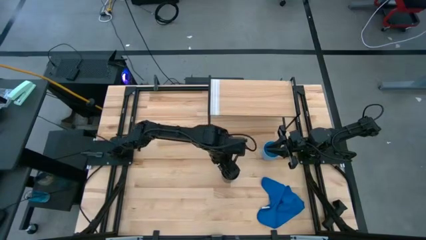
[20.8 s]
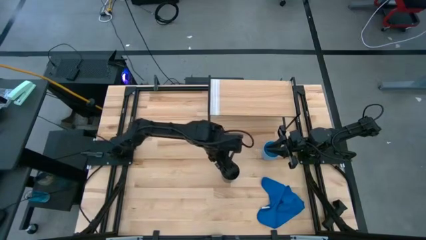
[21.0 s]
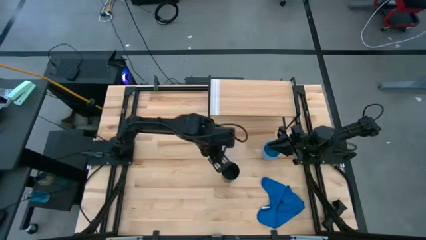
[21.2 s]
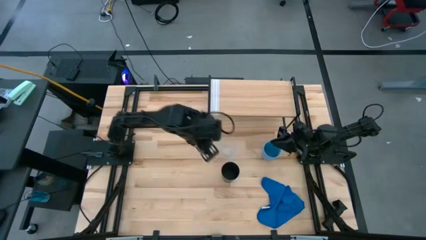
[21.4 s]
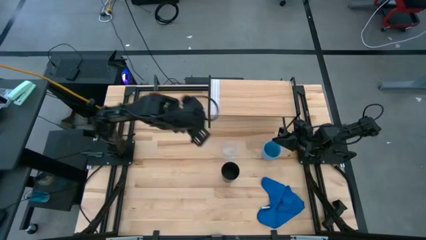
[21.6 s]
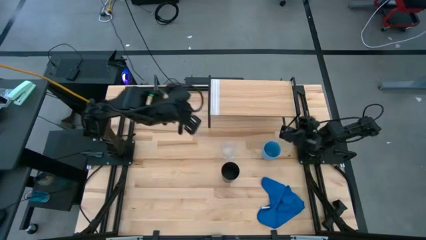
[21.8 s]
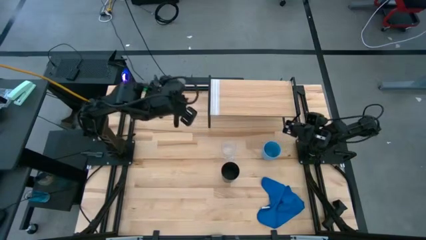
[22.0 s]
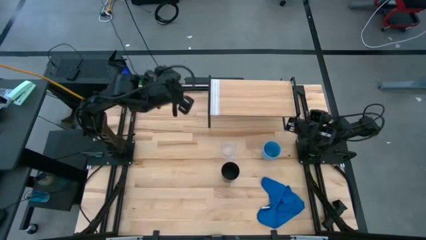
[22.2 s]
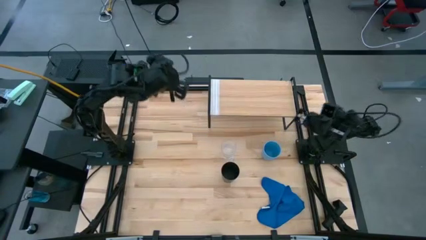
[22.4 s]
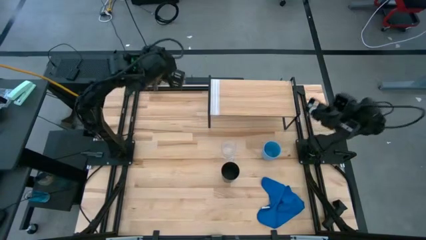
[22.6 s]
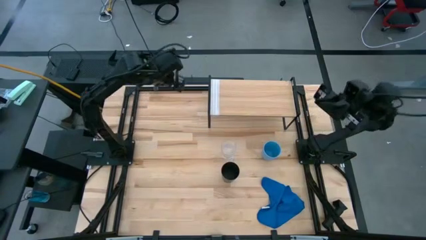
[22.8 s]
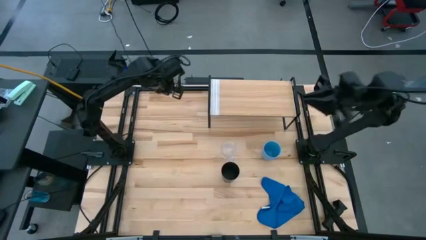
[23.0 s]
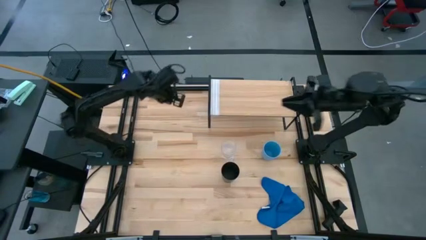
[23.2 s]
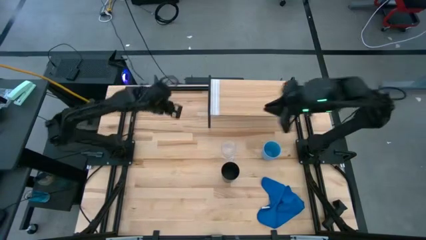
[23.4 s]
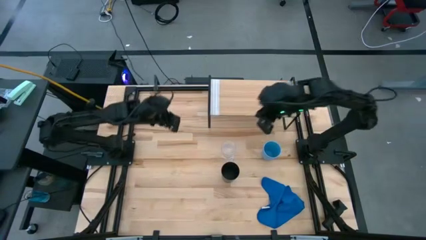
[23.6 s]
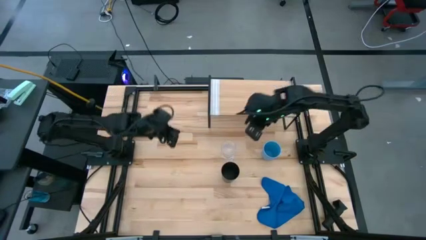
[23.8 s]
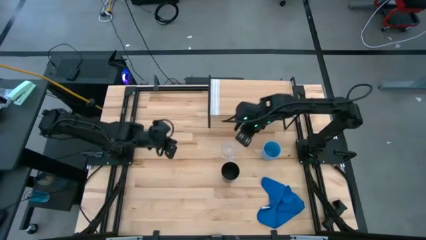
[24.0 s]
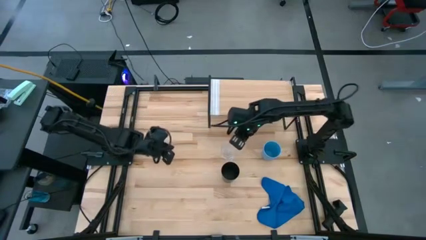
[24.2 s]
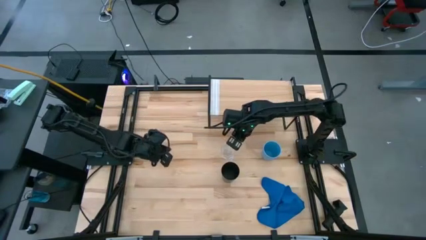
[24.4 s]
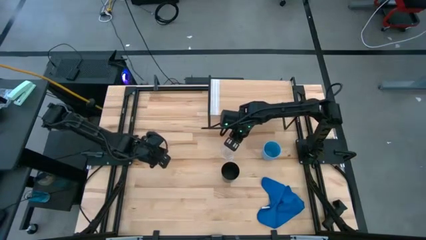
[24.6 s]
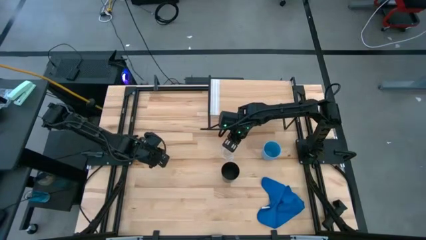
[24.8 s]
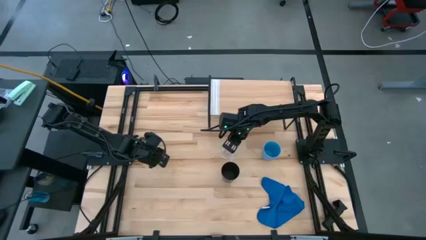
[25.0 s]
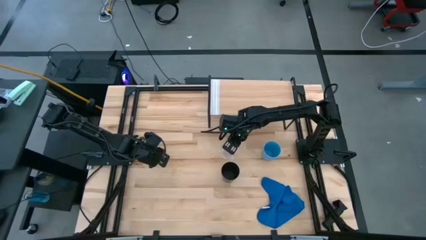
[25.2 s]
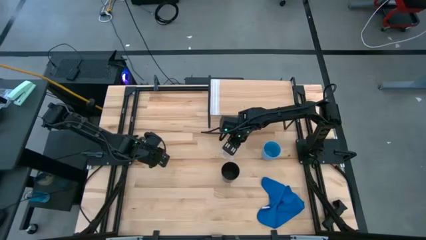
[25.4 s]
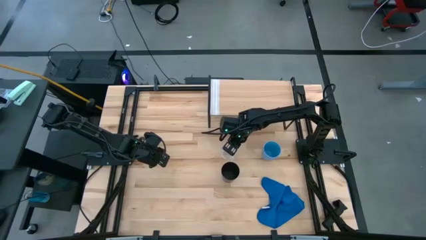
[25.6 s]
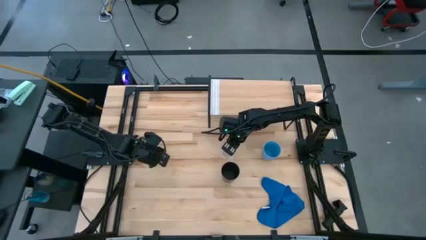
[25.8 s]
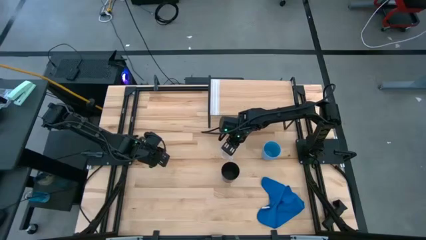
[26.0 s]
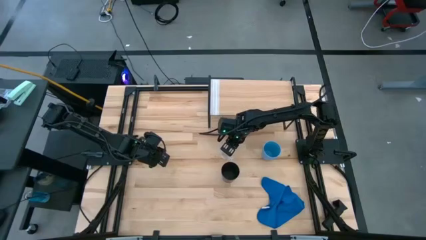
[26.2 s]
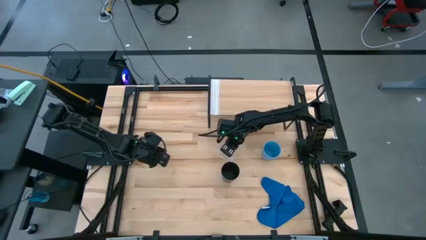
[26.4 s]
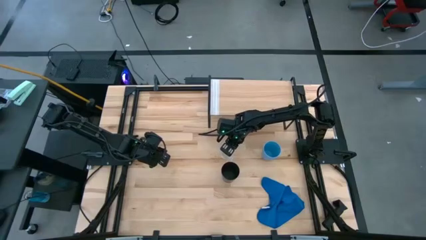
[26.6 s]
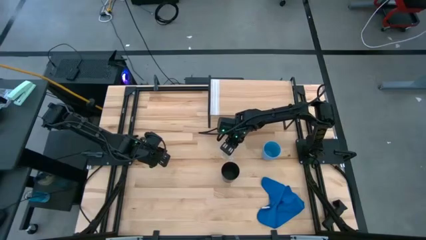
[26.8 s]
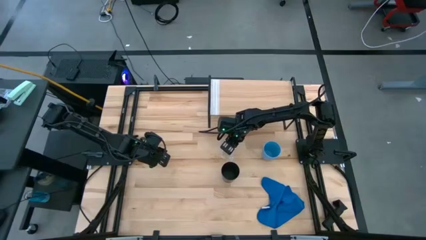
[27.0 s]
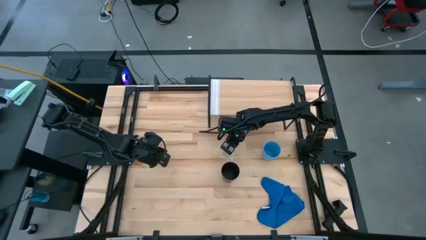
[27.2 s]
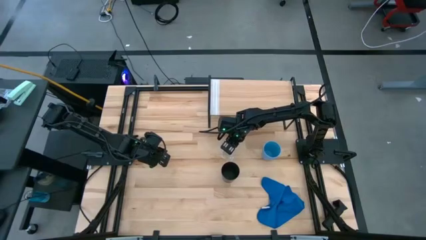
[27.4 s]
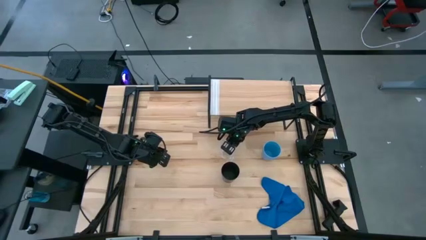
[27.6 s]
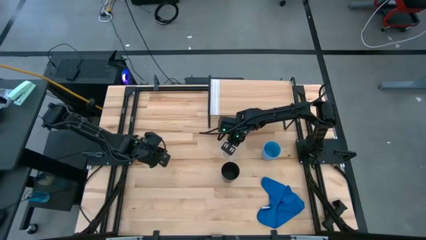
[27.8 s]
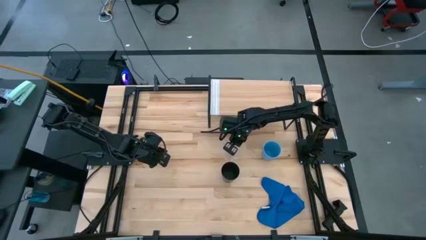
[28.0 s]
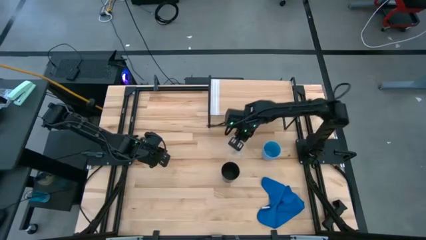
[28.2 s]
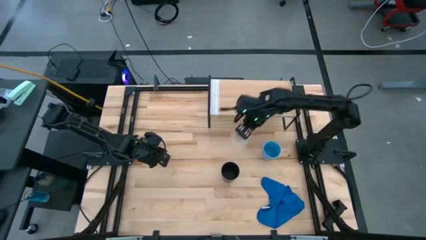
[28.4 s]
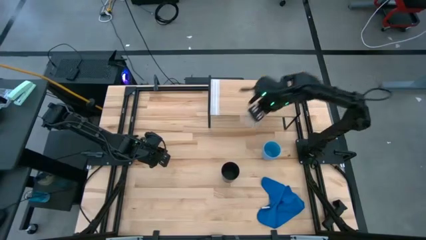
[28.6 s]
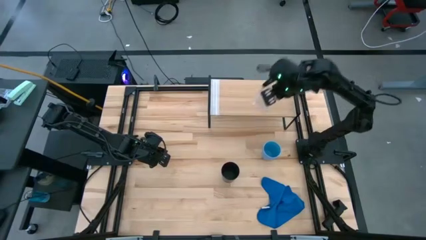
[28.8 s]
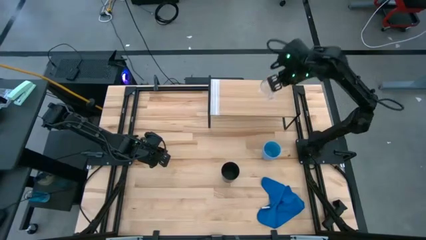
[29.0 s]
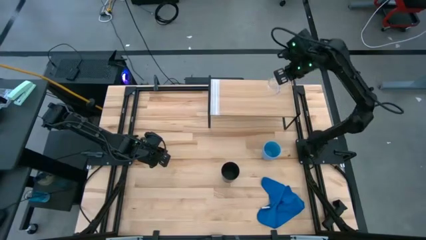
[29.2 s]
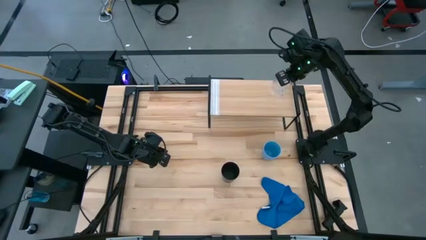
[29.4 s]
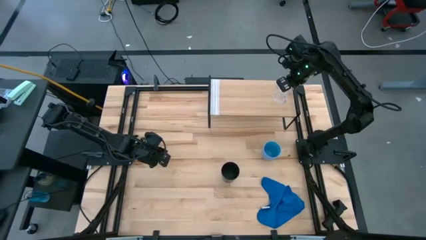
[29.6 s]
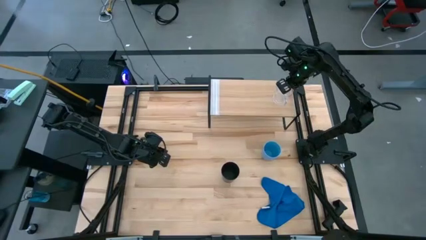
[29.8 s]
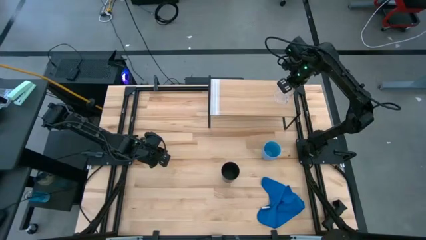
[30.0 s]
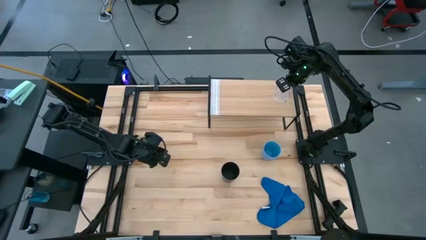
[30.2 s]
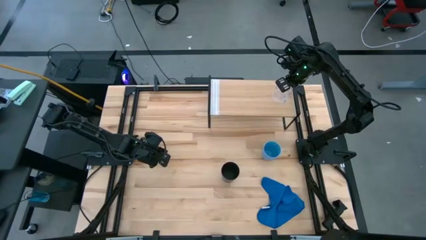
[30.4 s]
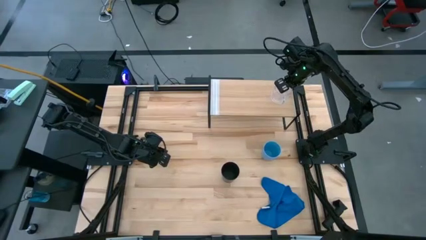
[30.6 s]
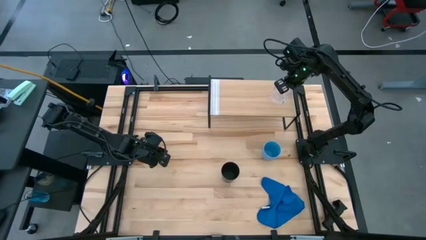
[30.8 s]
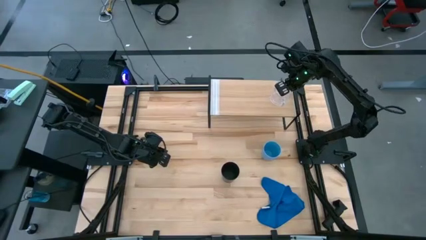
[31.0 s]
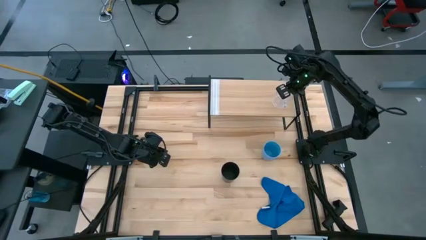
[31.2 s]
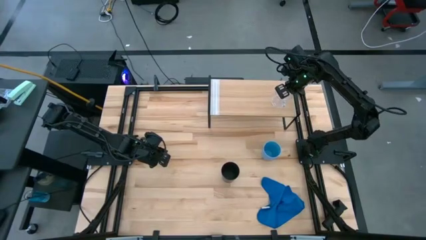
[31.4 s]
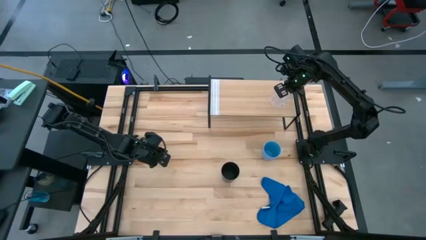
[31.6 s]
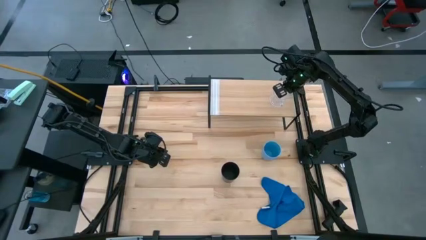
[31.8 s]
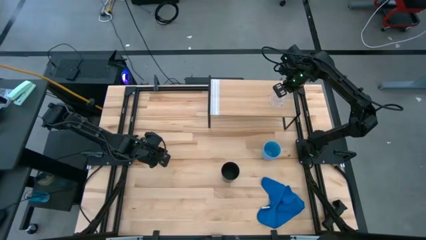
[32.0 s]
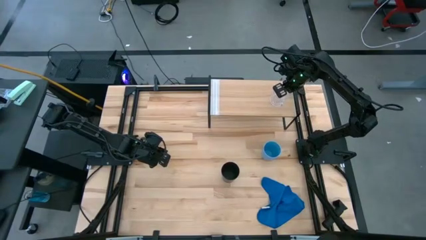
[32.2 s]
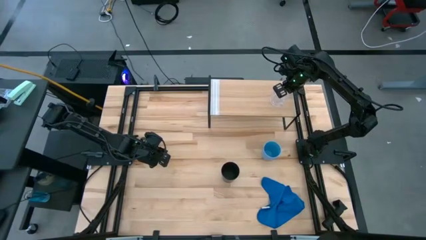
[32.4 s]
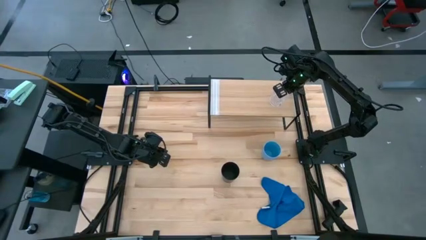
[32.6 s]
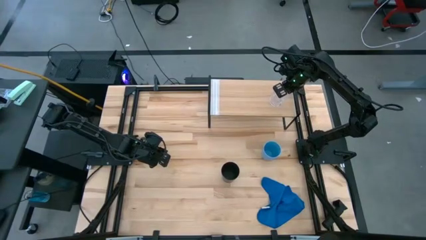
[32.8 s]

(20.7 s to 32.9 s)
Task: Stack small to large cups/mugs on shelf
Put the transparent cup on the shelf

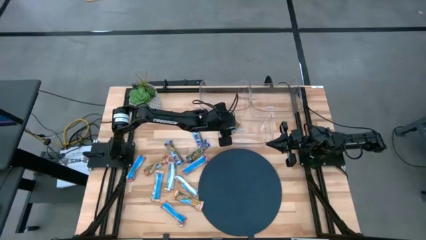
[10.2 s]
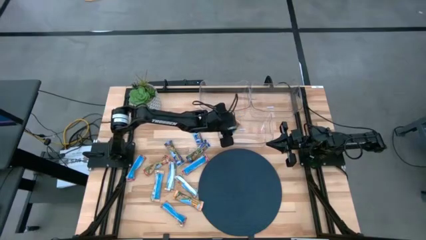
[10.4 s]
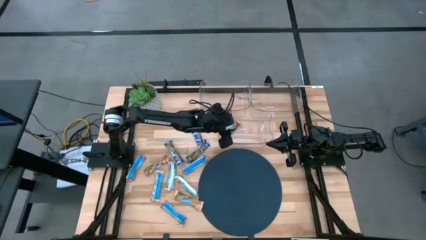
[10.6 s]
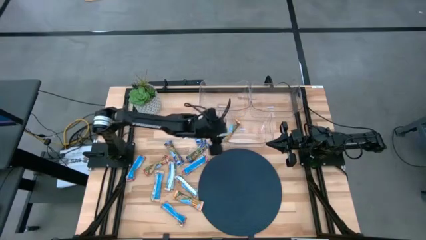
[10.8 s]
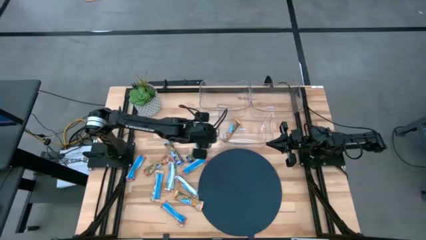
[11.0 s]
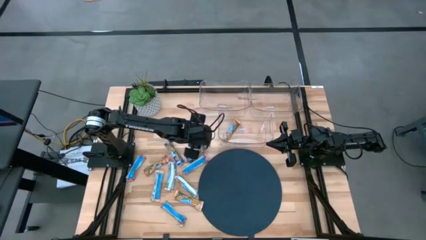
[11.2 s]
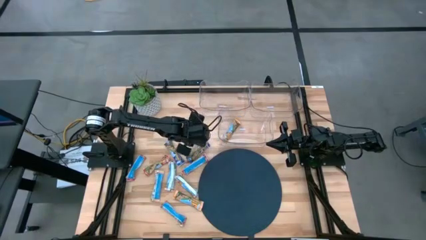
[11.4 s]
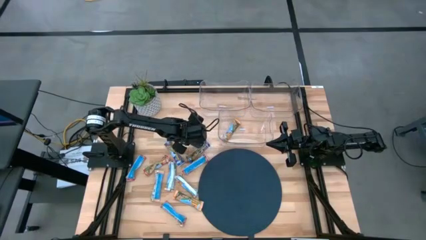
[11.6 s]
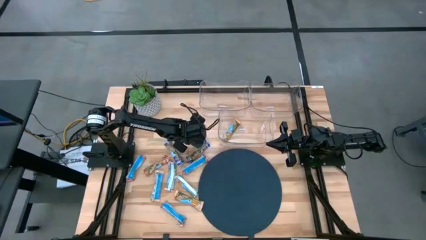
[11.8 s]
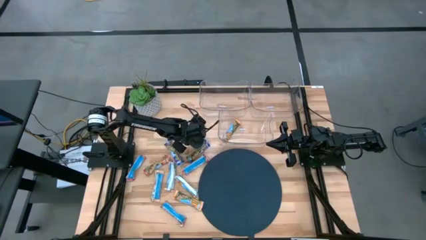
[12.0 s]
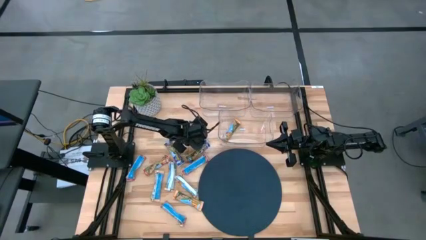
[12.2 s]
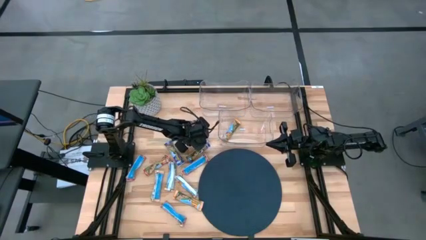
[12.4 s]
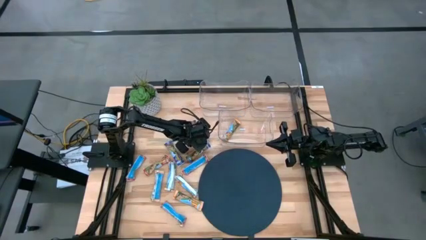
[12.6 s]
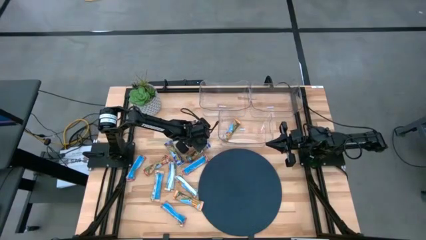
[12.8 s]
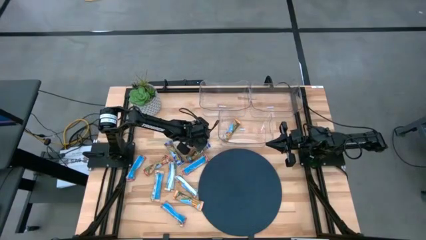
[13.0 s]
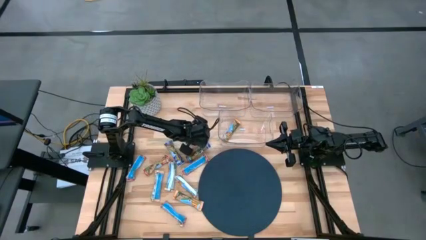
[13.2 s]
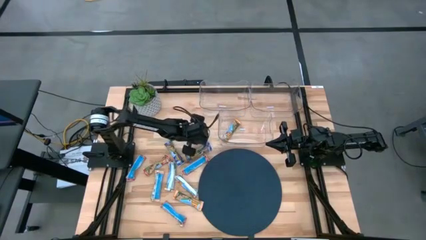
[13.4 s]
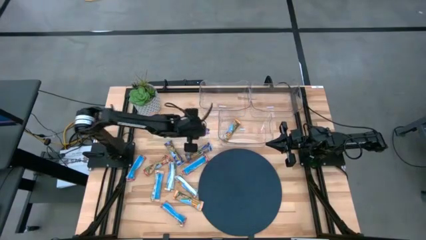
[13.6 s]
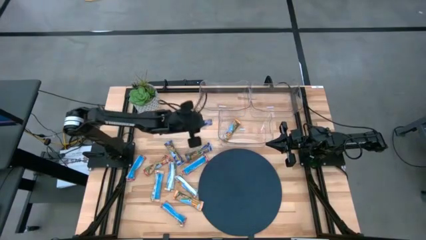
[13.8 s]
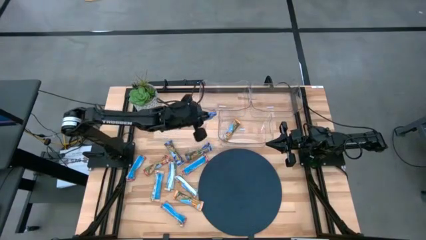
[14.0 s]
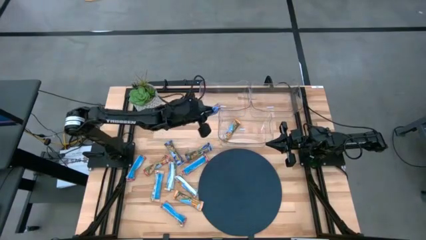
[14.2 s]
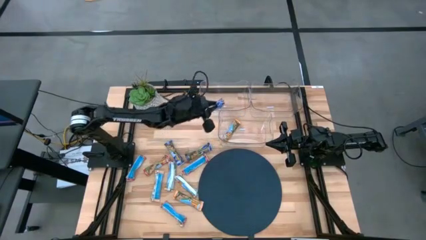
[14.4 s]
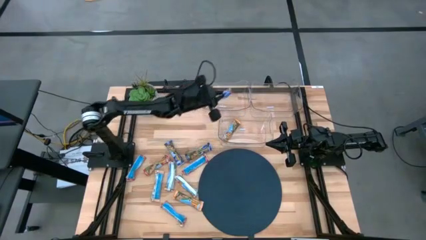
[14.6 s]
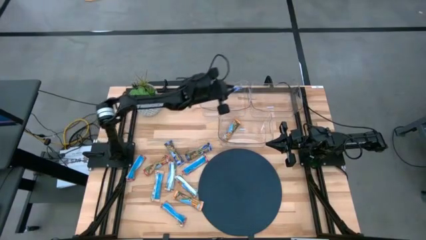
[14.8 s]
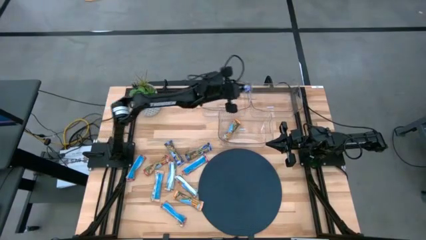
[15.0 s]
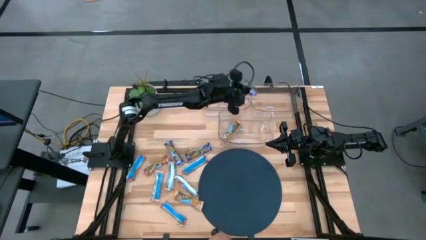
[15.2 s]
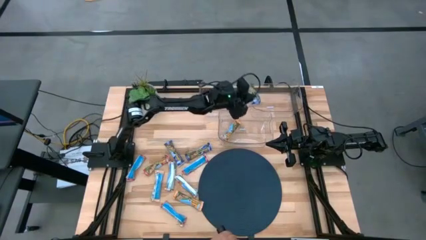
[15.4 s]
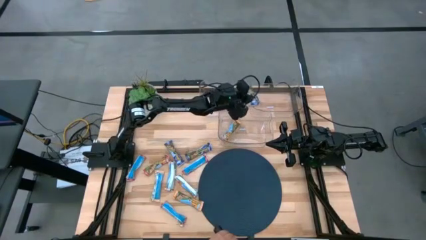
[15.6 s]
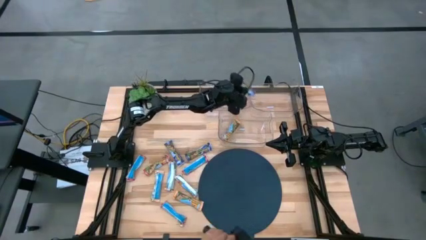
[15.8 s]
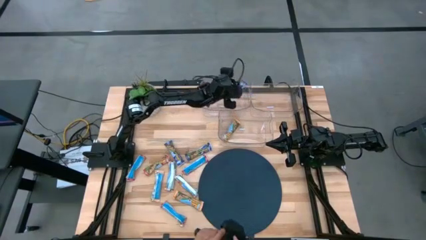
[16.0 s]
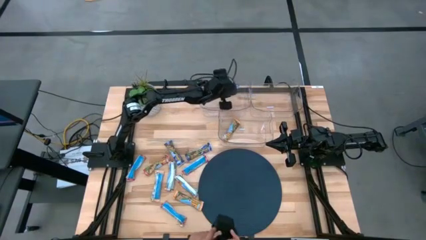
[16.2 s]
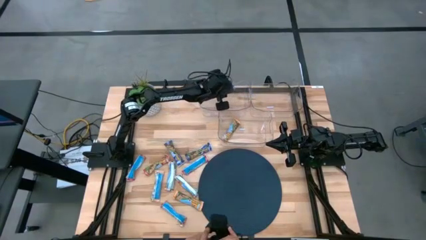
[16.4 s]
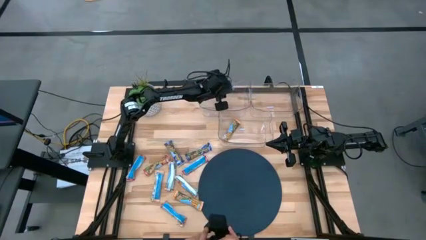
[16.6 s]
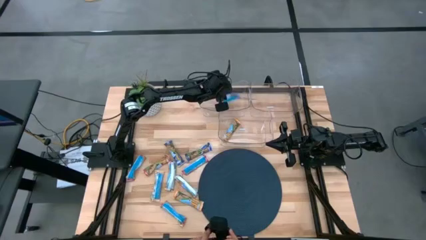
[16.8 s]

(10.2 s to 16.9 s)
Task: Pick and place Granola Bars by type
Put the blue granola bar into the top left transparent bin
